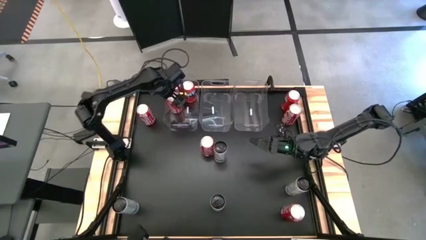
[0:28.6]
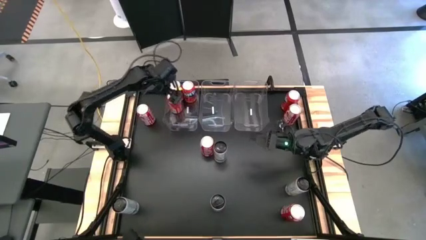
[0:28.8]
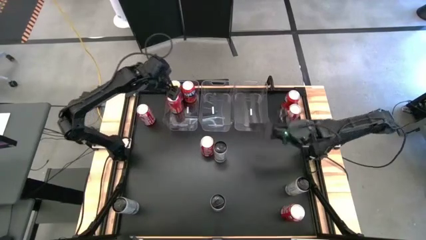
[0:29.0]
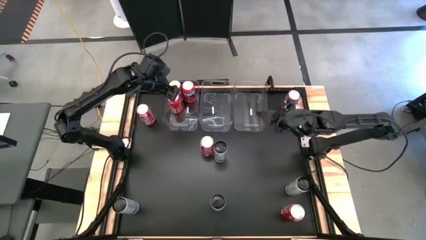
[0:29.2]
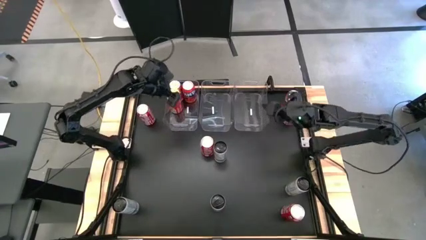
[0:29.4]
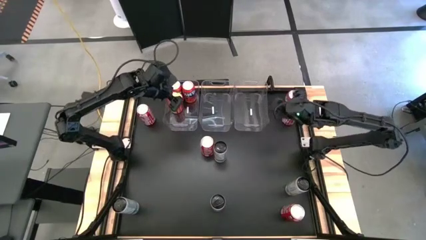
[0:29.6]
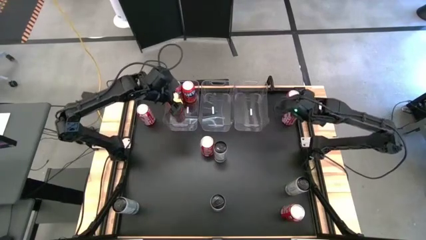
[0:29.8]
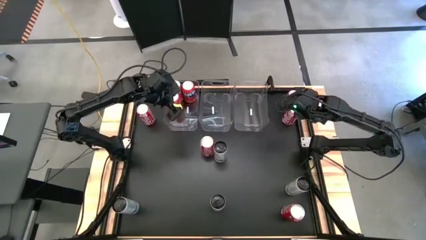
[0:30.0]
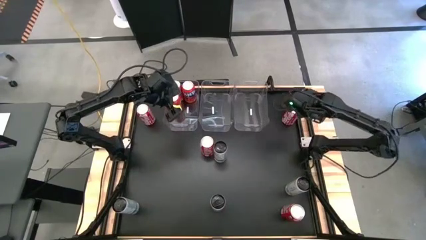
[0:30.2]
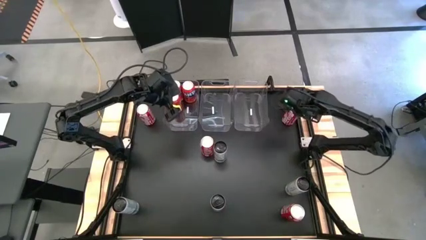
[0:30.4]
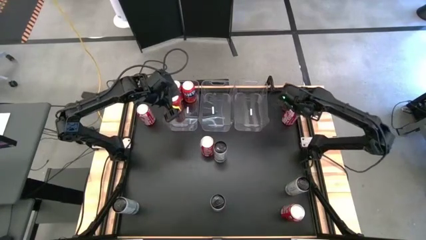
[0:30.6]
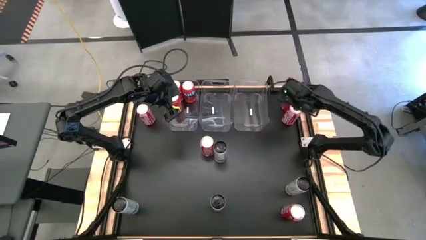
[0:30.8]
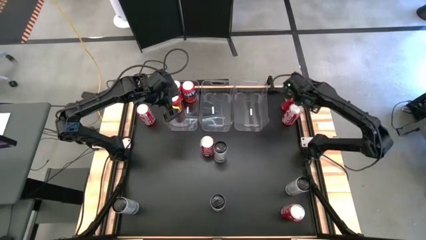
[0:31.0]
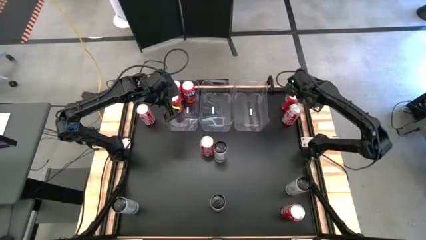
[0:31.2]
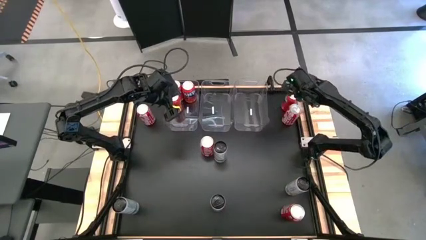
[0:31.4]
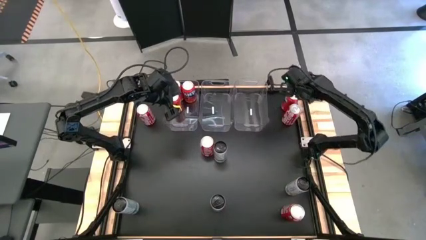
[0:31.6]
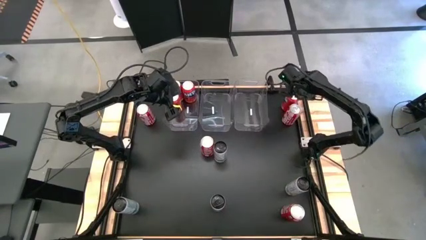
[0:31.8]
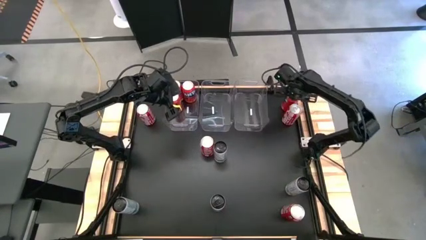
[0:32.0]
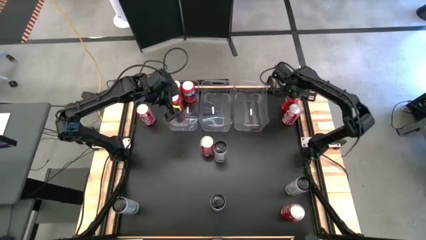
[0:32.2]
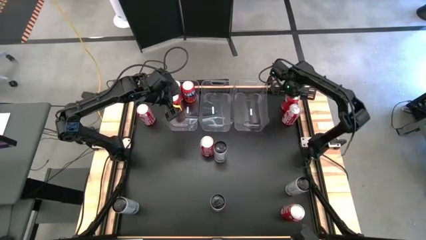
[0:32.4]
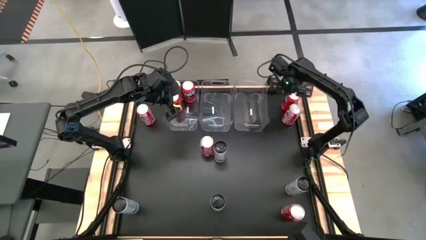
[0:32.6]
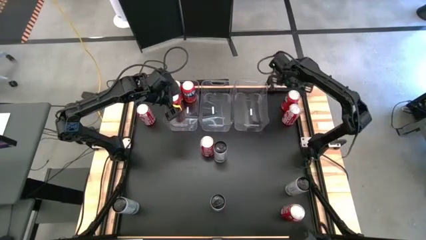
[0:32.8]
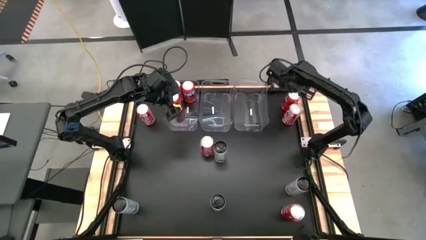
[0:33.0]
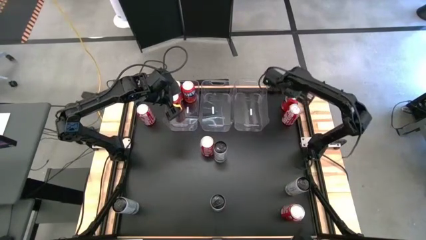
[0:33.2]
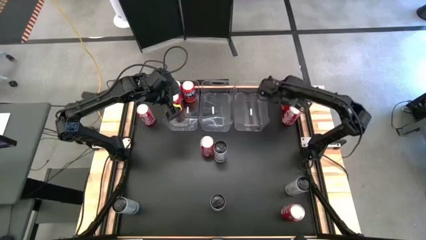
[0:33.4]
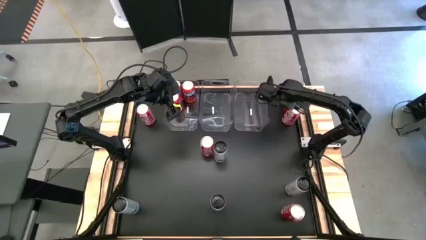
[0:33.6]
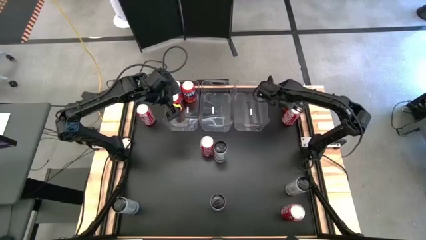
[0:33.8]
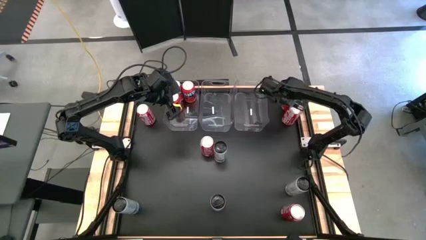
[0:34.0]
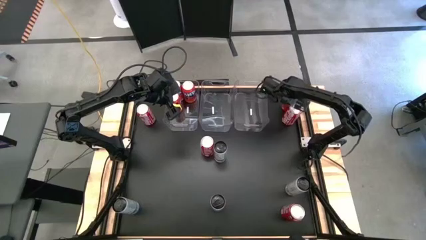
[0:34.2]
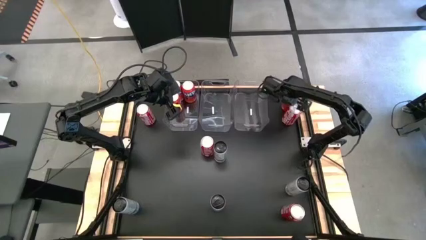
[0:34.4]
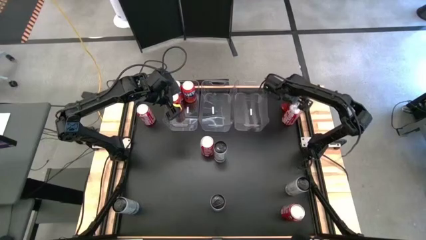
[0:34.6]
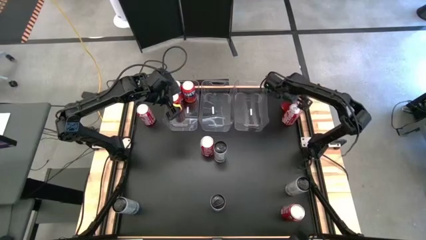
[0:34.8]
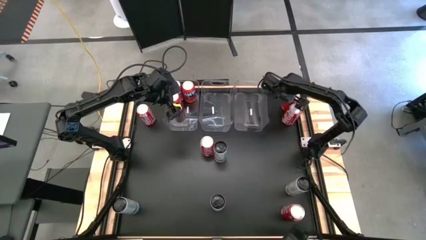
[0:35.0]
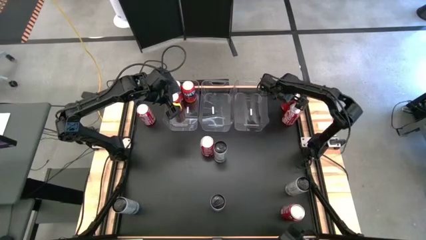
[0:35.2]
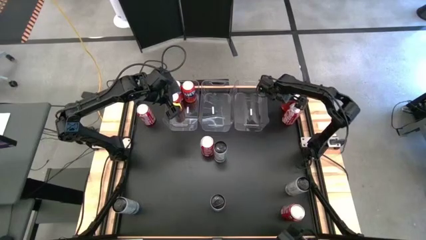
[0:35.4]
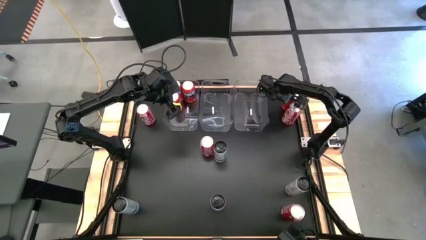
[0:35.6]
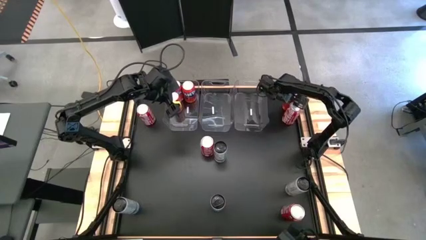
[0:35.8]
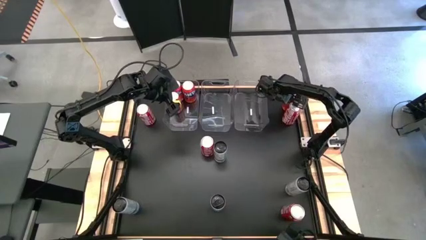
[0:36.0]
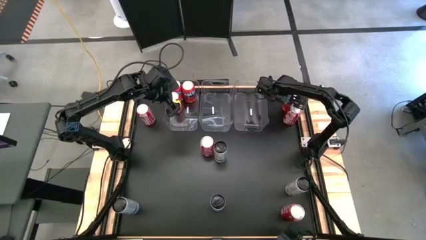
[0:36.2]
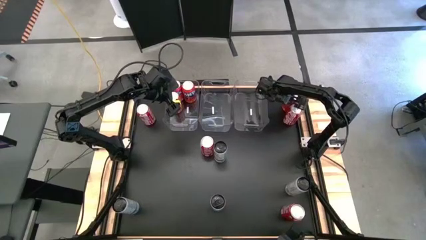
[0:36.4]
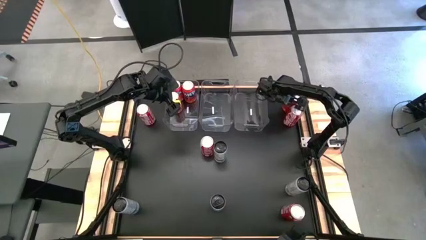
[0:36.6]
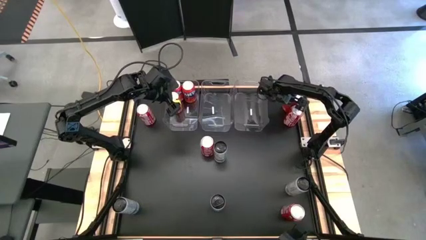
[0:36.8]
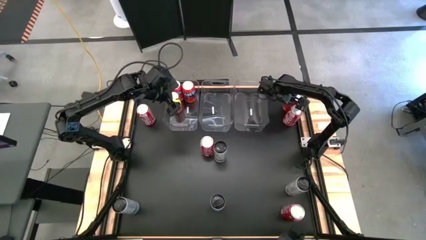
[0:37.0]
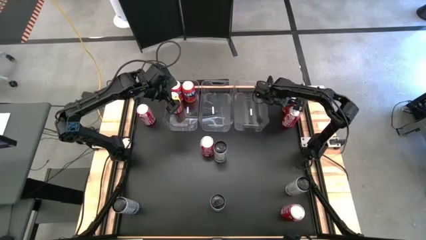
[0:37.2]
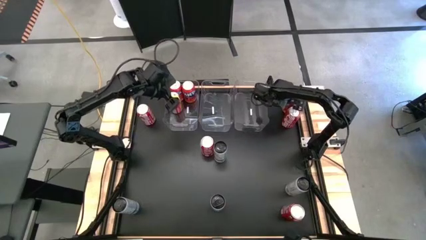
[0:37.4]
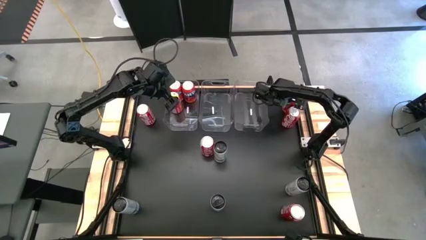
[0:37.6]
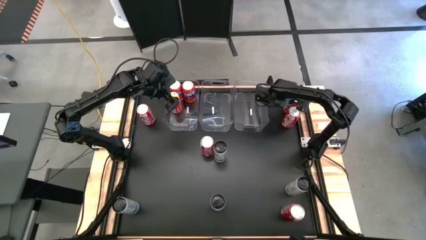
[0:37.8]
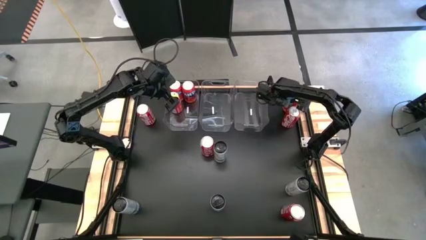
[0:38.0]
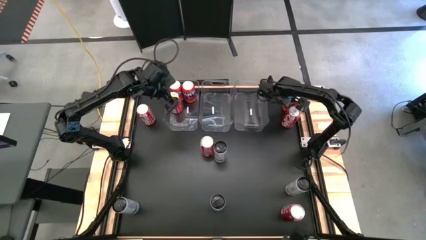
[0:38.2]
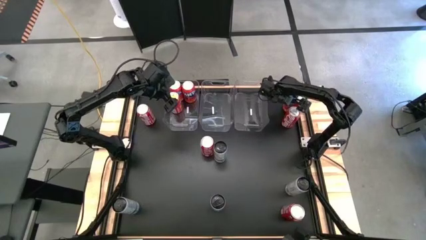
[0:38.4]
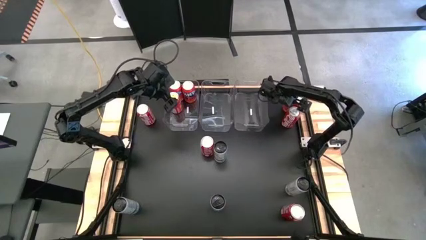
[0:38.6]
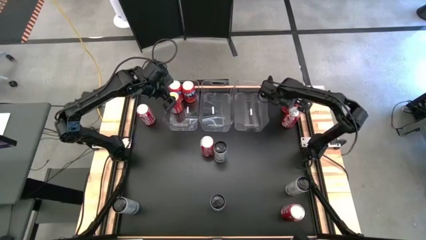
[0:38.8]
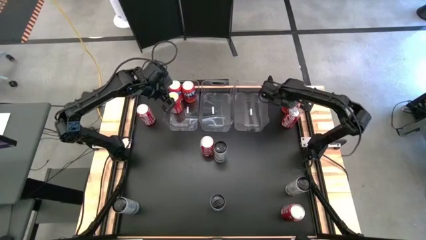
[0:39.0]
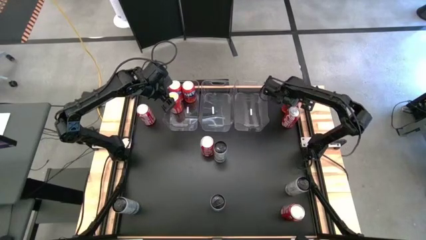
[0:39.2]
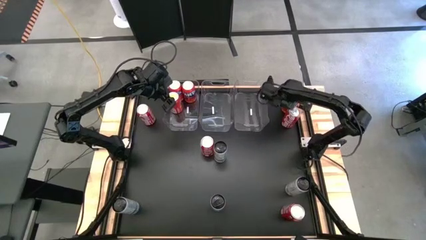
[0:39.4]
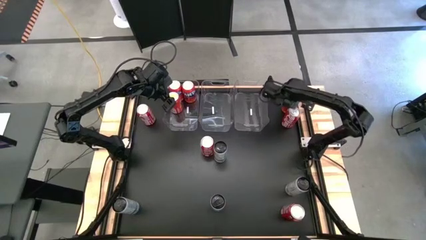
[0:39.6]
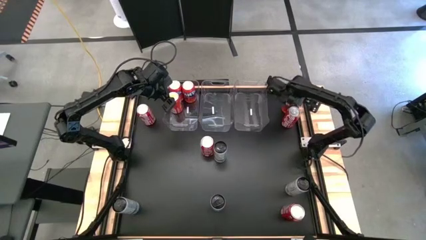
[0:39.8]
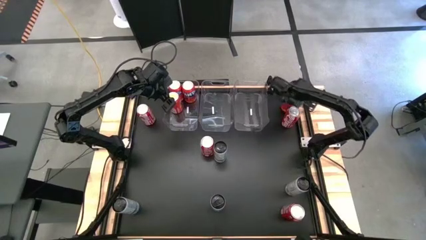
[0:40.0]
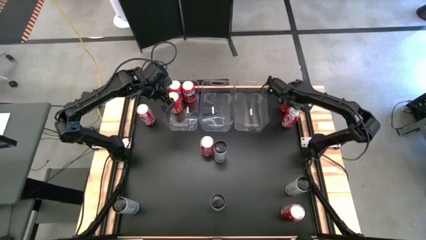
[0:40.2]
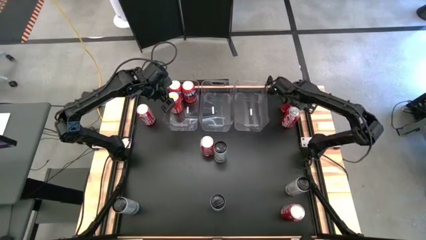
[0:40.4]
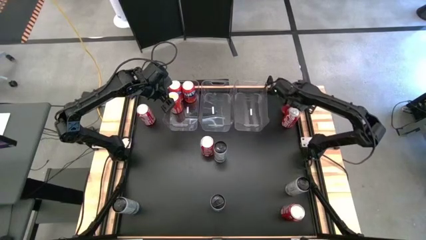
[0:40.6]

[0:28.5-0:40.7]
Task: Sort soda cans
Put the red soda can into the left transparent bin

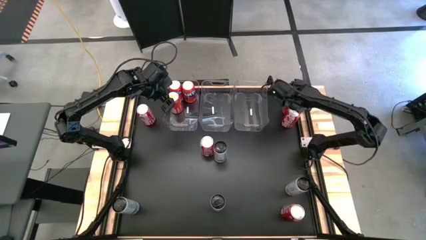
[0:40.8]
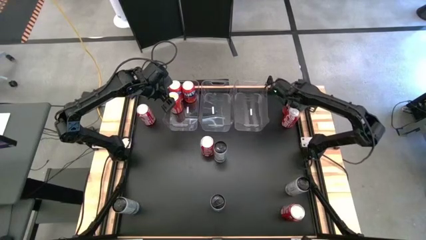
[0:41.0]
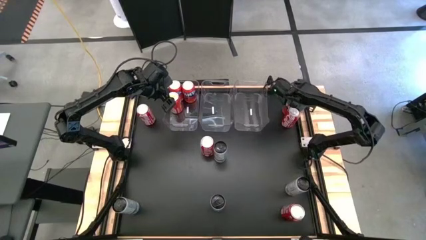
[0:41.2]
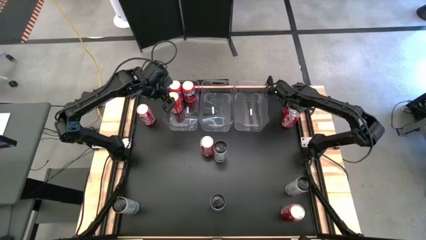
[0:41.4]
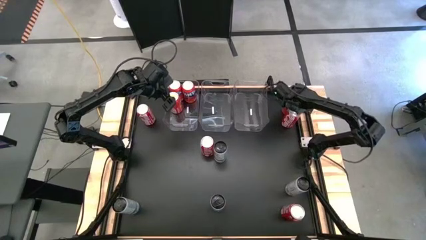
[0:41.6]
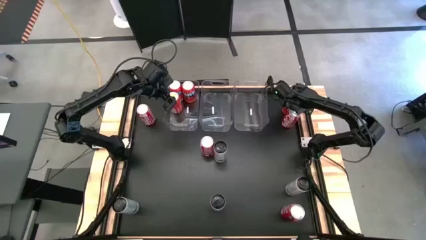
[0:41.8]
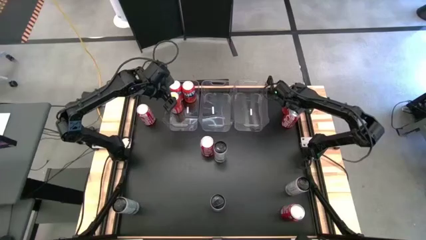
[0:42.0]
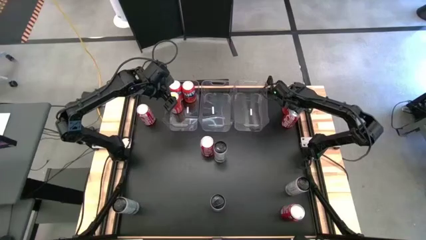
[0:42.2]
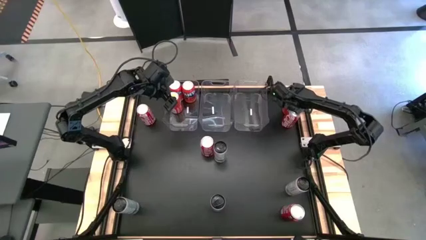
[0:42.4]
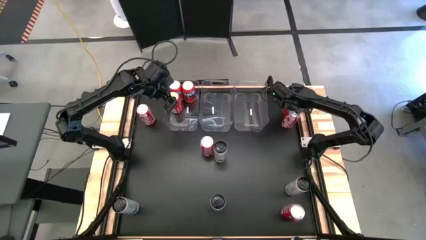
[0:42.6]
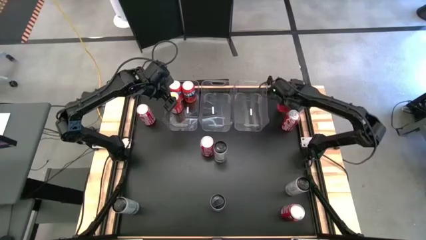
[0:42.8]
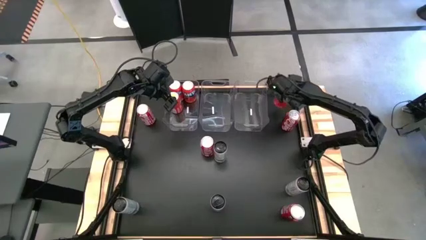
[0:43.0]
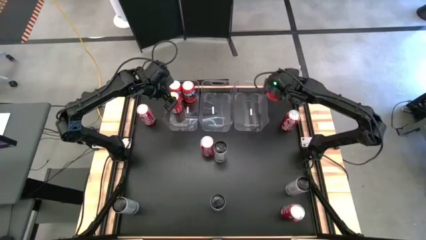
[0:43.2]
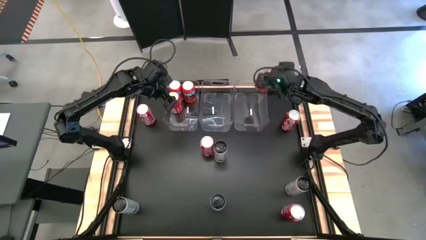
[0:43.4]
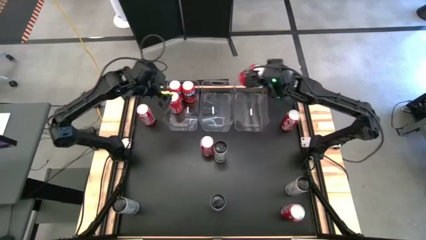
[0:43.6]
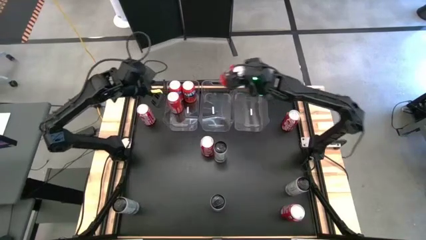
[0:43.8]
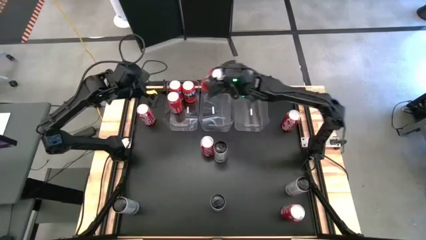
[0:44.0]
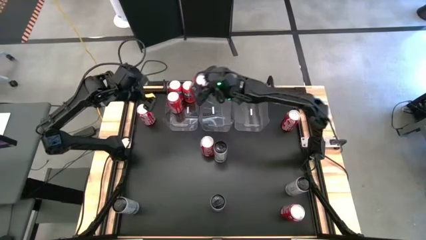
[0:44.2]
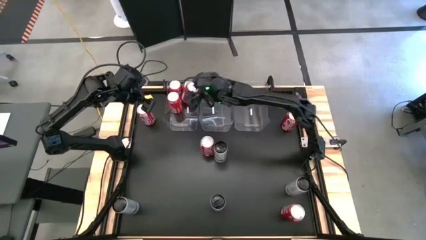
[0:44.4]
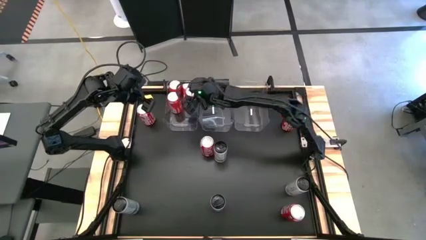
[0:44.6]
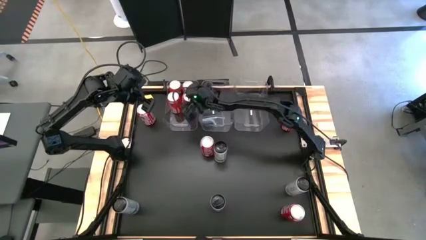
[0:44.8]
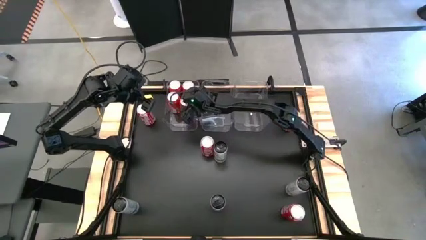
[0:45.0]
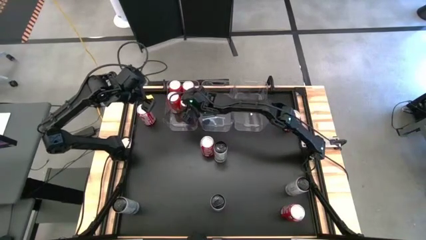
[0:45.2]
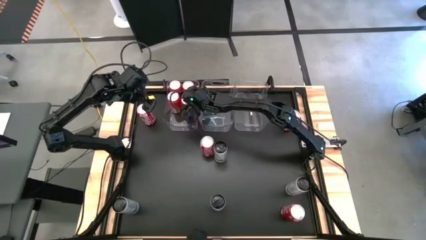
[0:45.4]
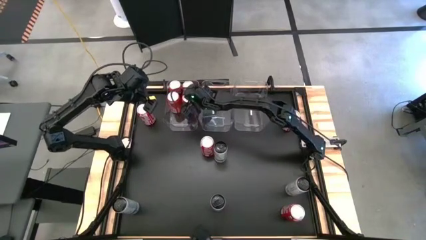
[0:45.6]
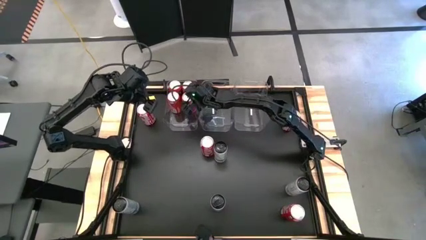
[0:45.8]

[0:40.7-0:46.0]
Put the red soda can into the left transparent bin
